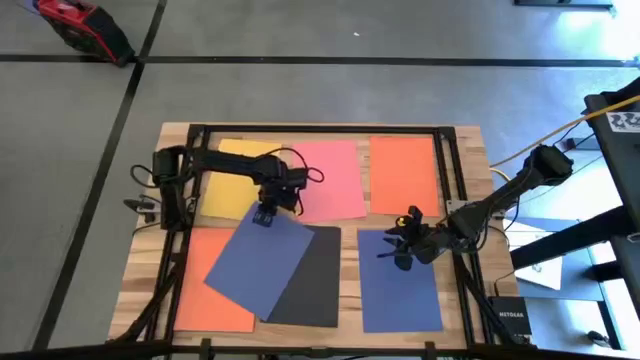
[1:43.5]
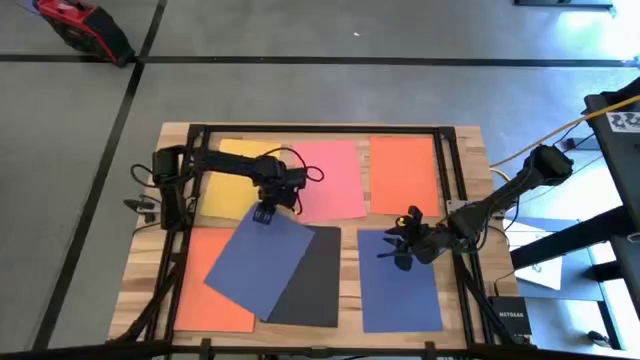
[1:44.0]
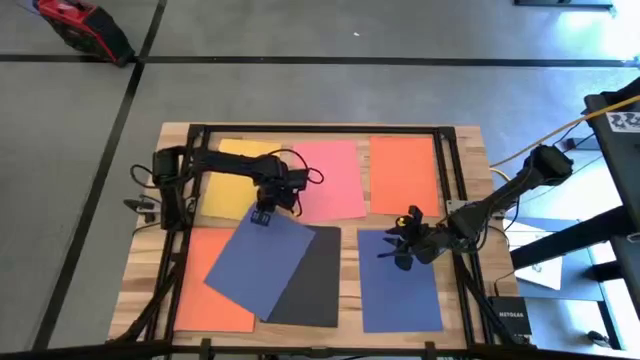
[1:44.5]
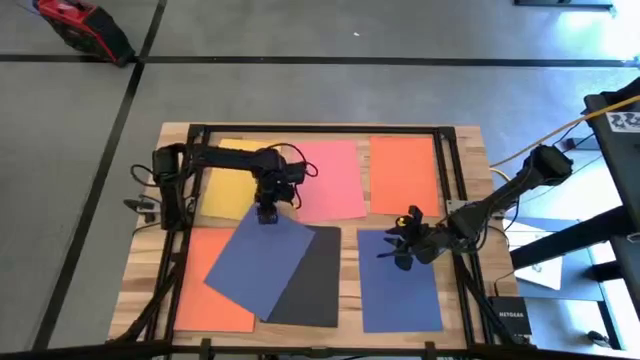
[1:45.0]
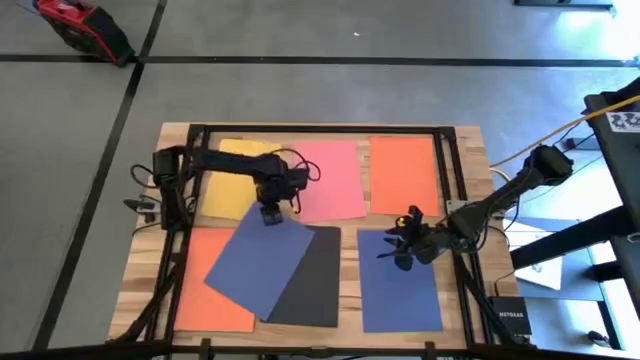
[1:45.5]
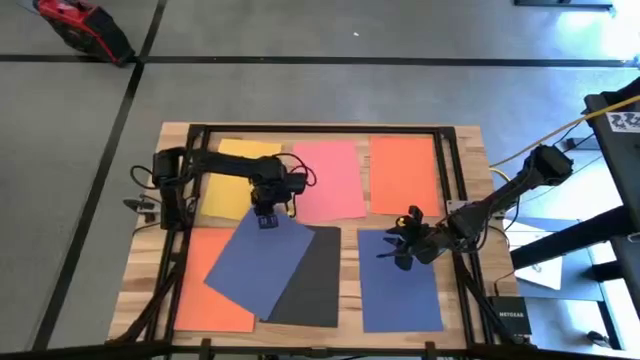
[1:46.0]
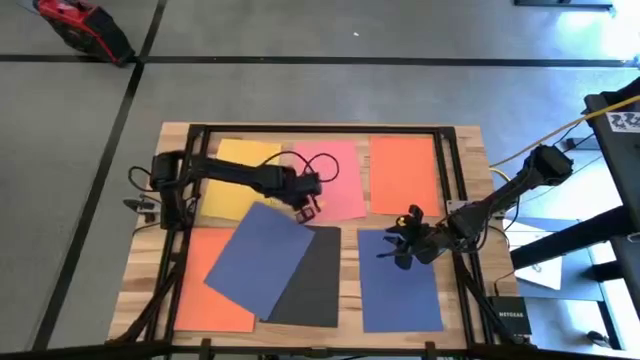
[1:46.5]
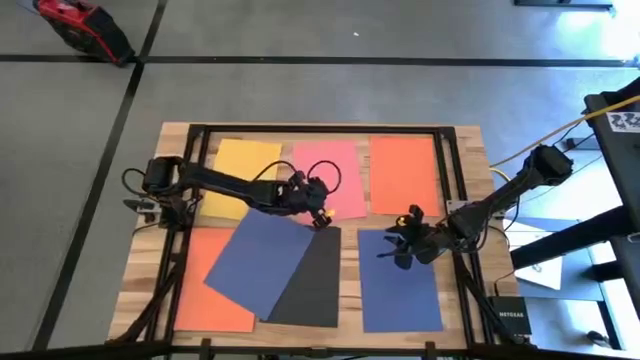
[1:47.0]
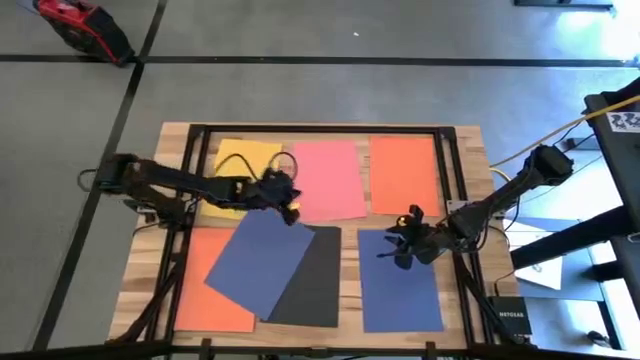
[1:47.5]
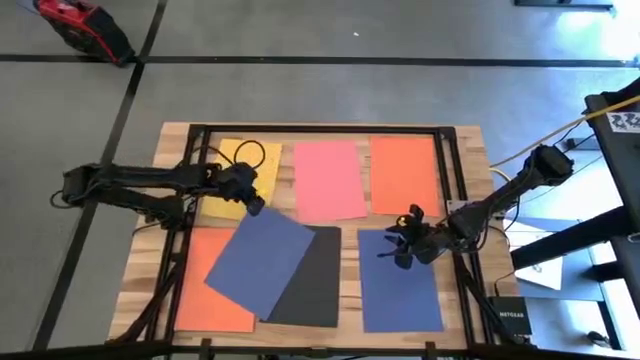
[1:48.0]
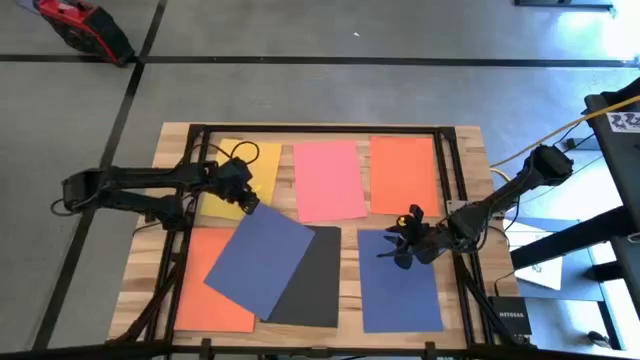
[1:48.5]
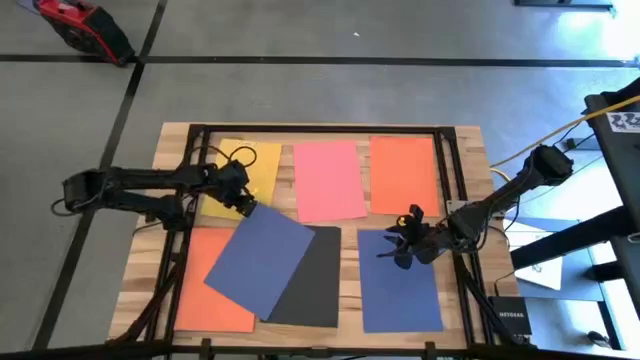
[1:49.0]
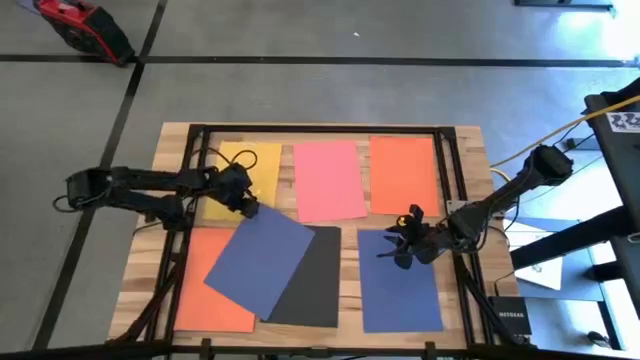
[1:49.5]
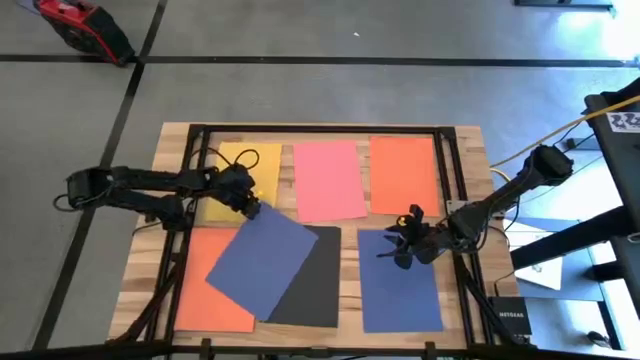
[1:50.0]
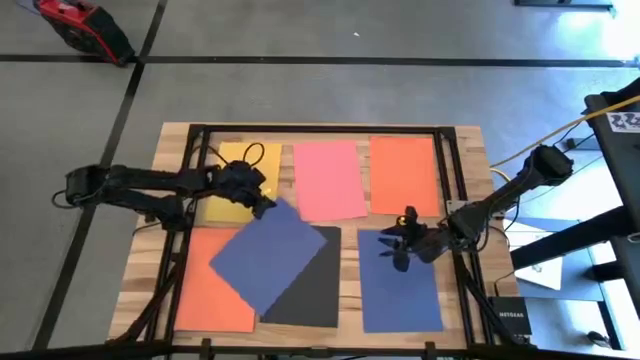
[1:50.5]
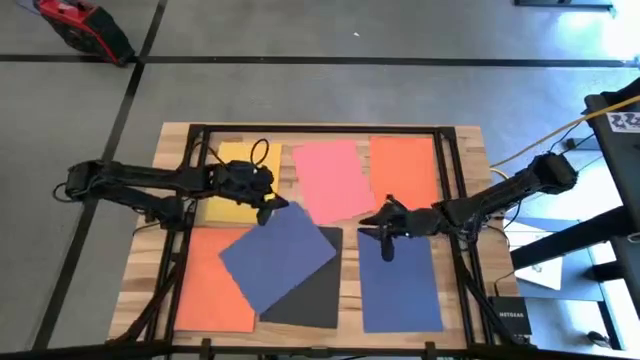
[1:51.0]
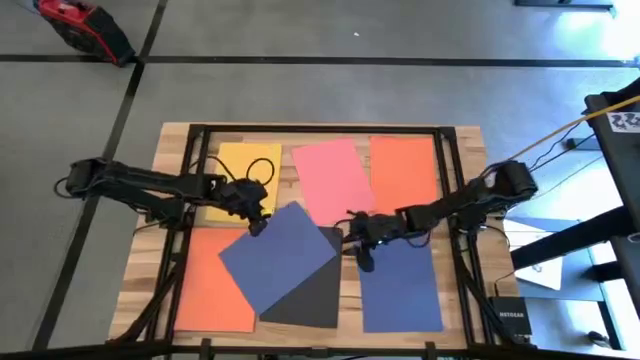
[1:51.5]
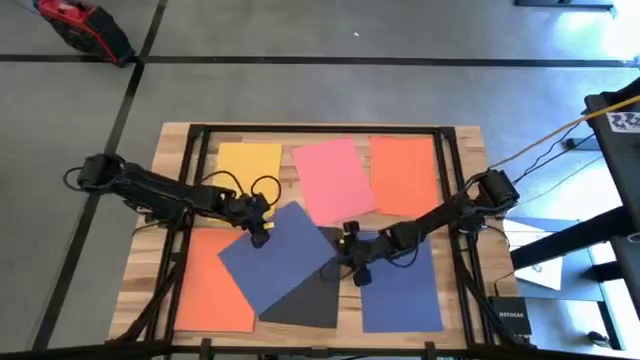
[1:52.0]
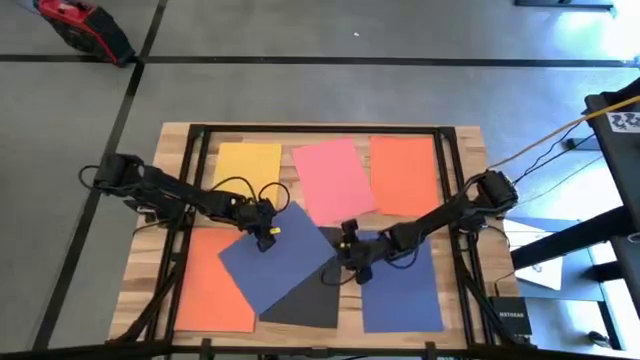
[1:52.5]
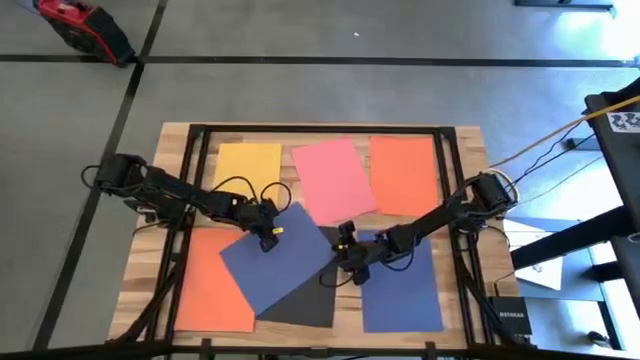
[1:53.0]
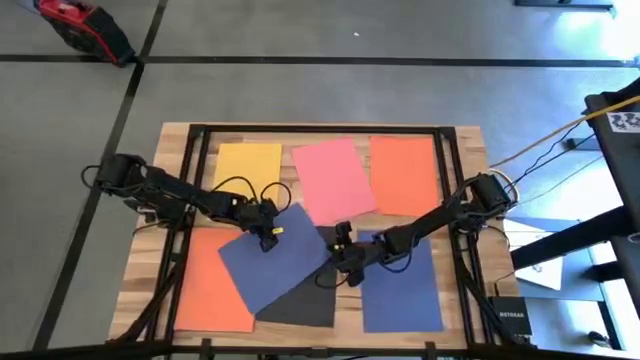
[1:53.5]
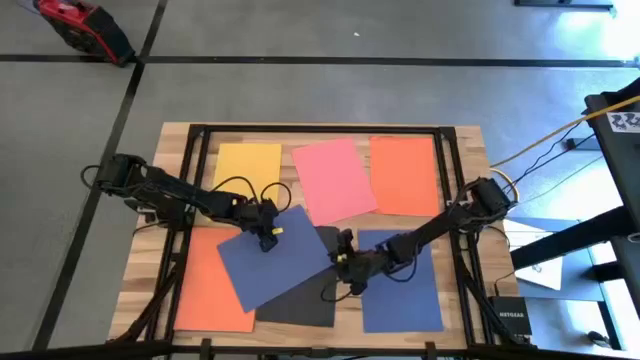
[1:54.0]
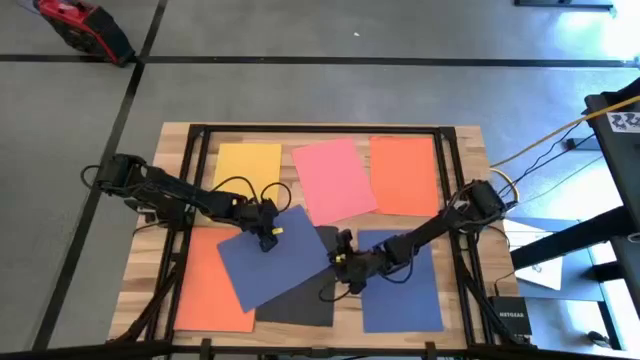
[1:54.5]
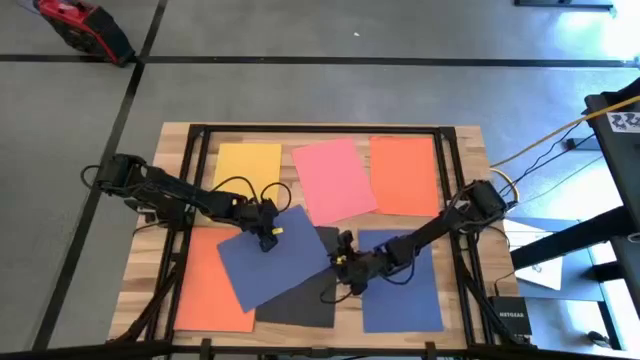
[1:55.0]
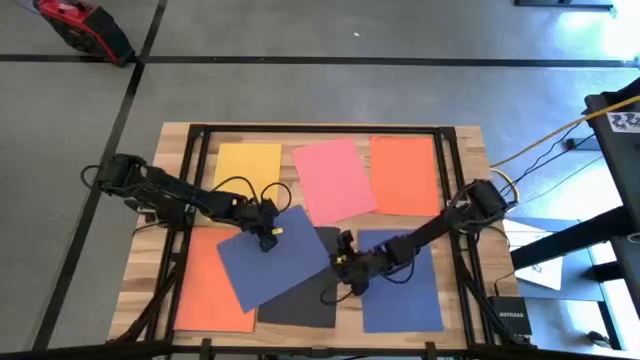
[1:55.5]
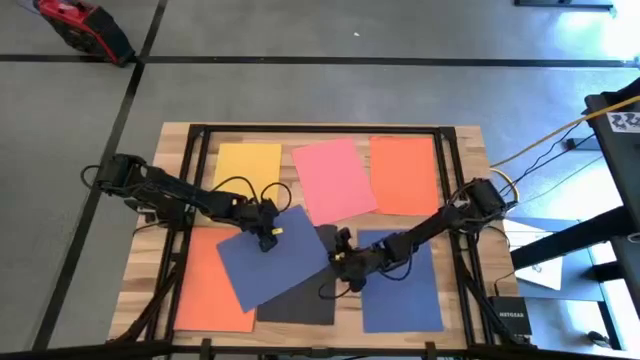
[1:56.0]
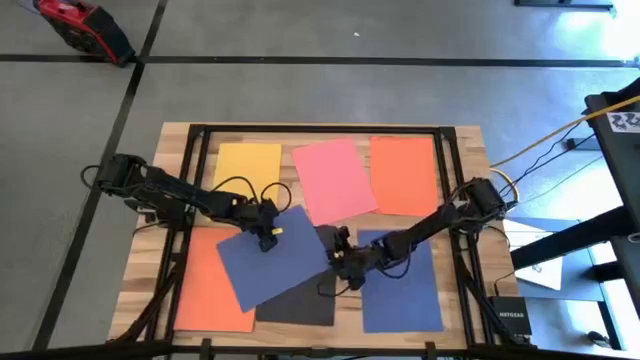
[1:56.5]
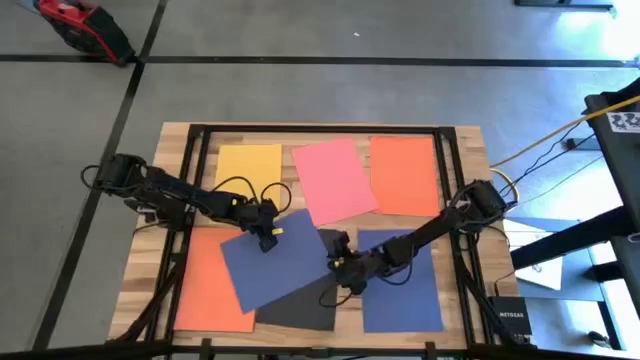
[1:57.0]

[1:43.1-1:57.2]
Task: Organize paper
Stack the blue paper on top of the blue paper on the table

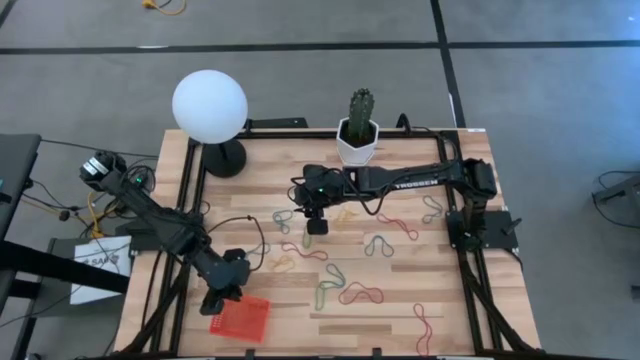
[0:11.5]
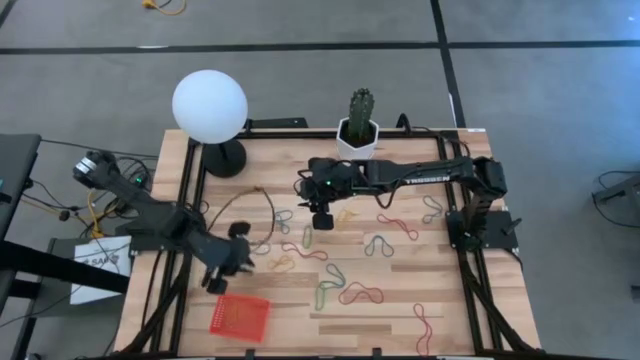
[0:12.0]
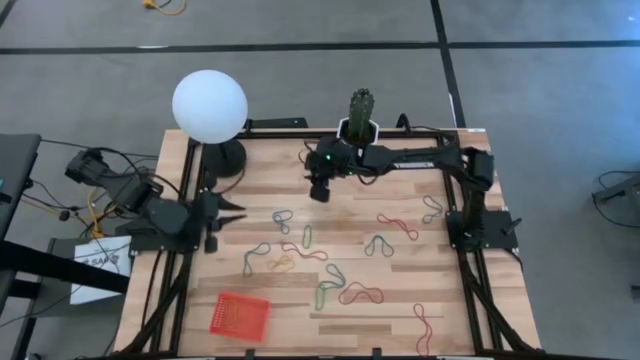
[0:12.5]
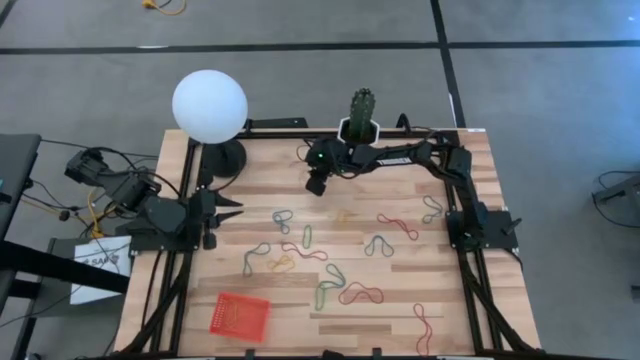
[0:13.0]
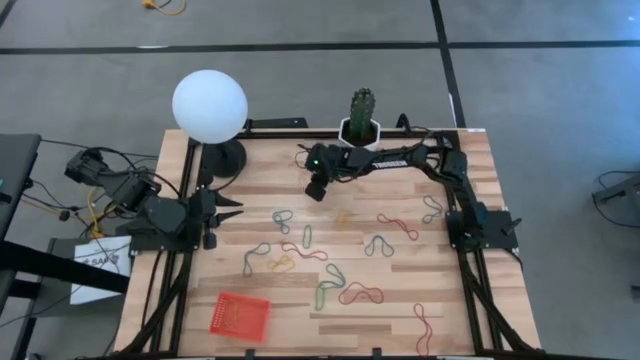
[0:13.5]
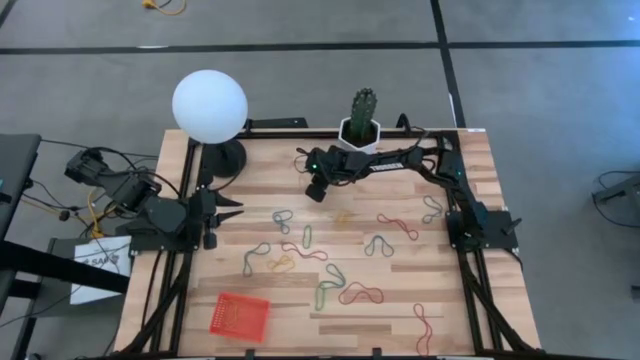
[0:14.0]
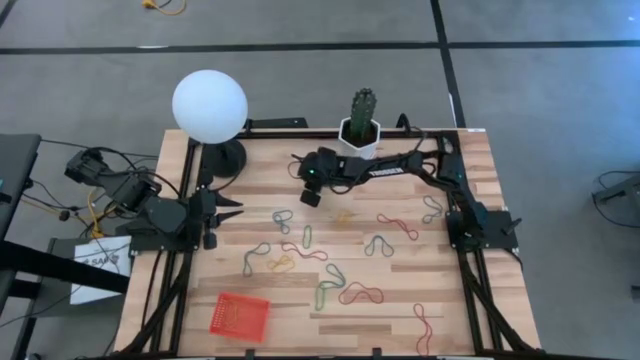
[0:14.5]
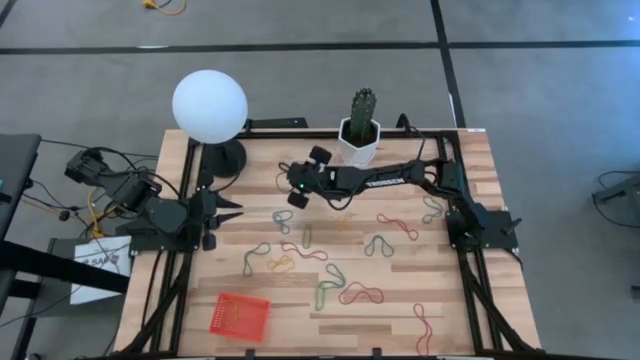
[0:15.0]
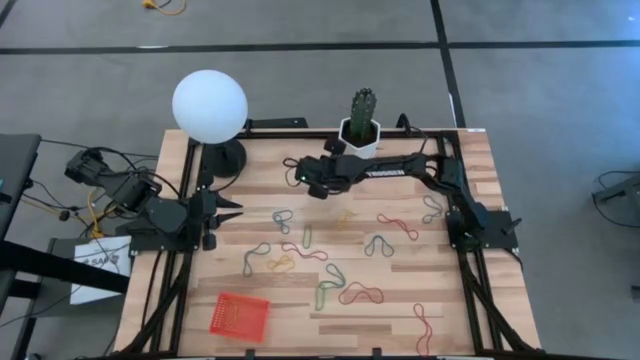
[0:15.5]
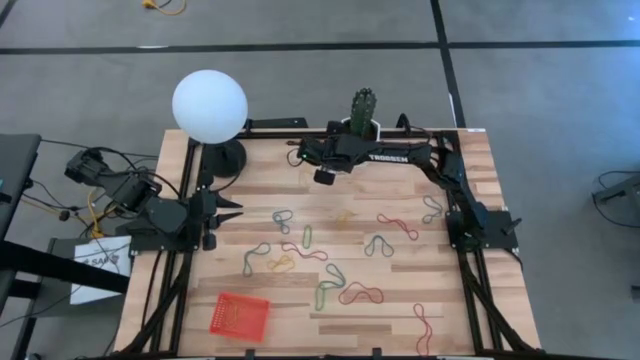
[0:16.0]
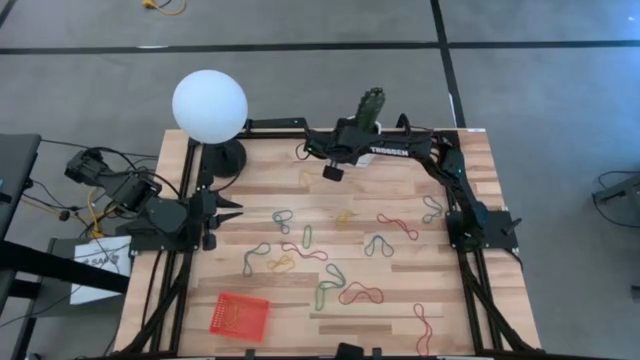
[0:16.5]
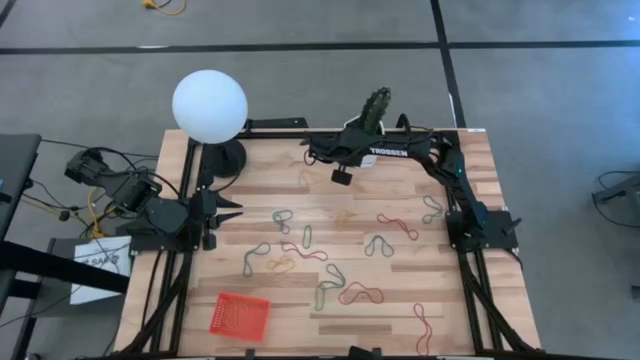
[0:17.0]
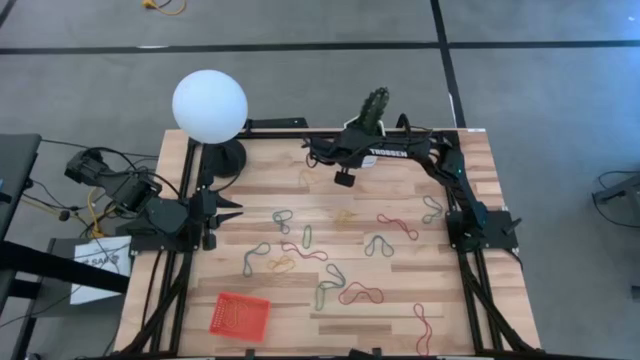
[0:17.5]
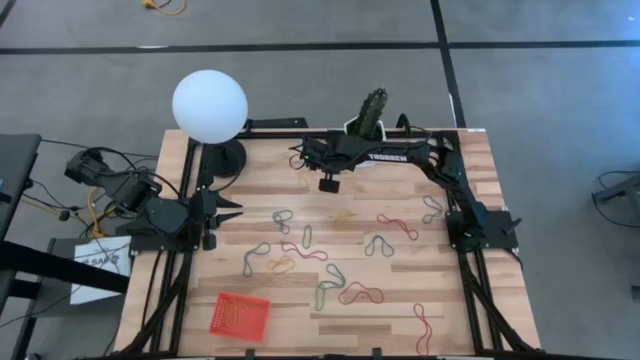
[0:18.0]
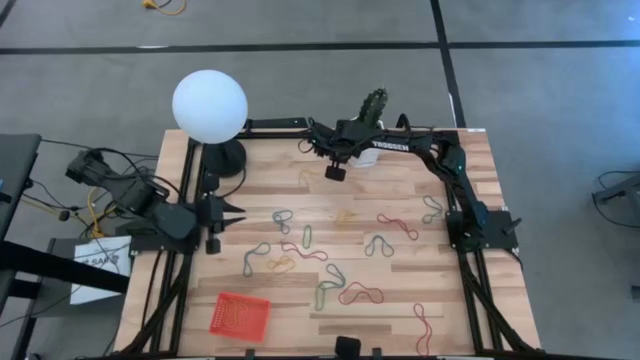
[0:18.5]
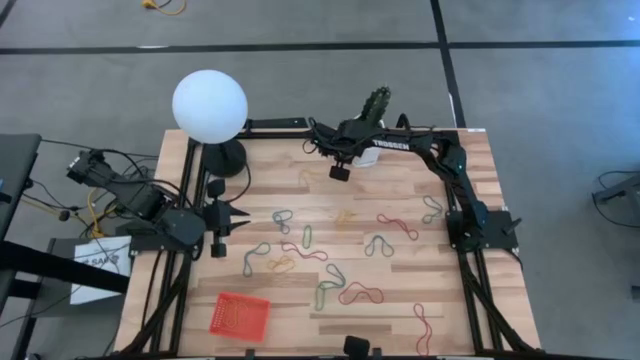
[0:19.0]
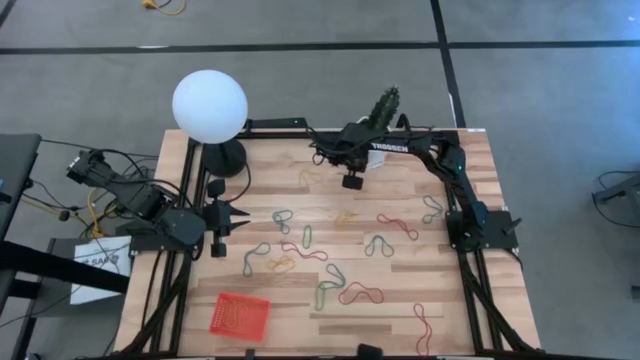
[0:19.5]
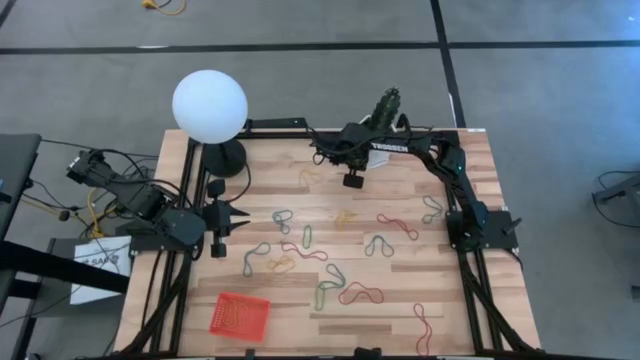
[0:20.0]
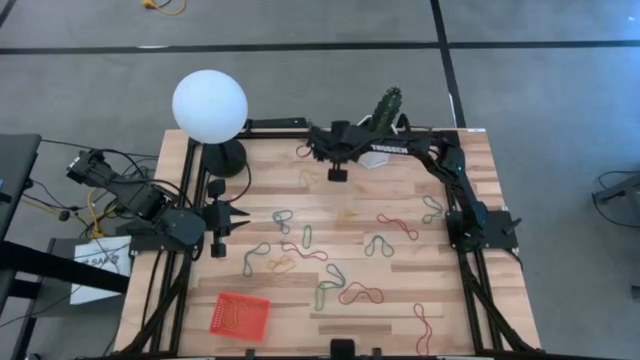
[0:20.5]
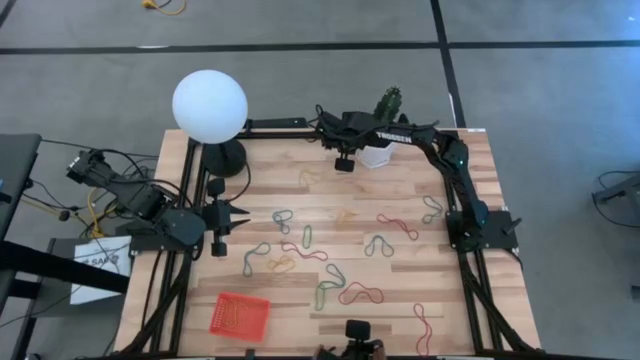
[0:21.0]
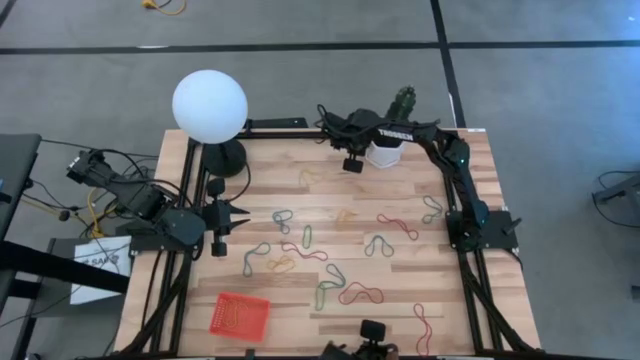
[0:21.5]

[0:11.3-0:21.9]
Task: Pick and place rubber bands into bin
Adjust the flower pot to the right side of the table
